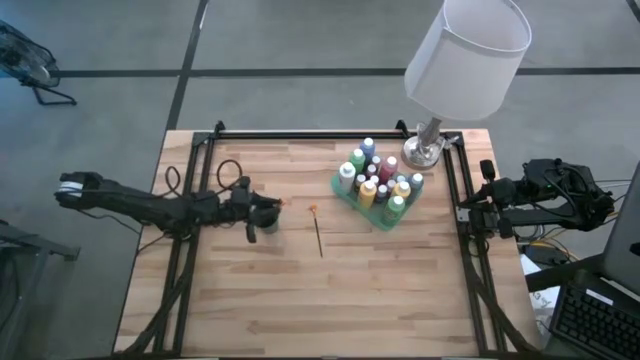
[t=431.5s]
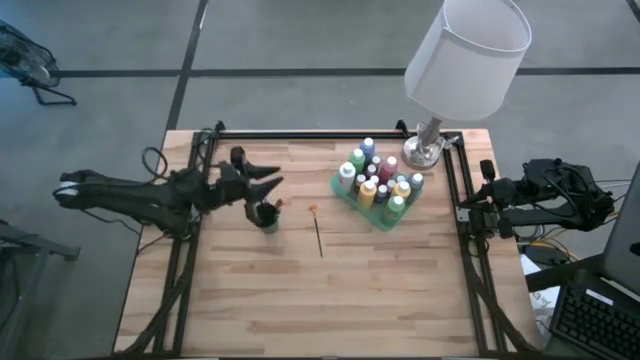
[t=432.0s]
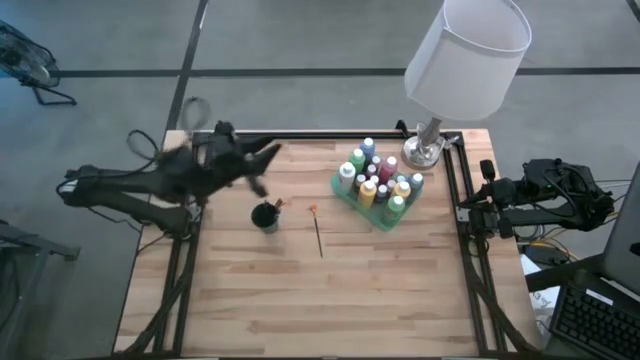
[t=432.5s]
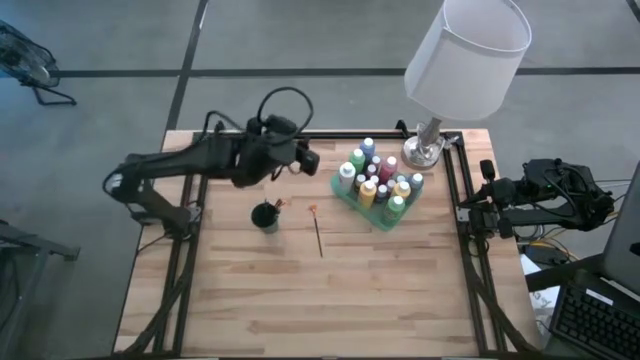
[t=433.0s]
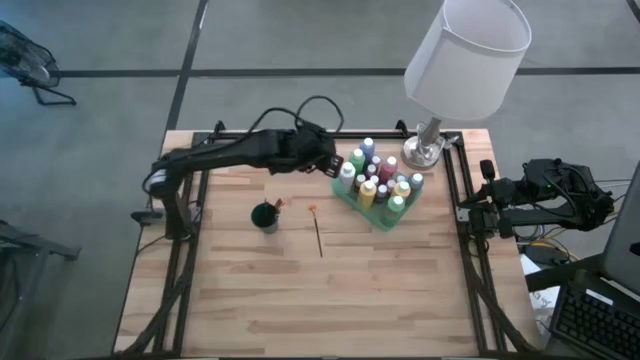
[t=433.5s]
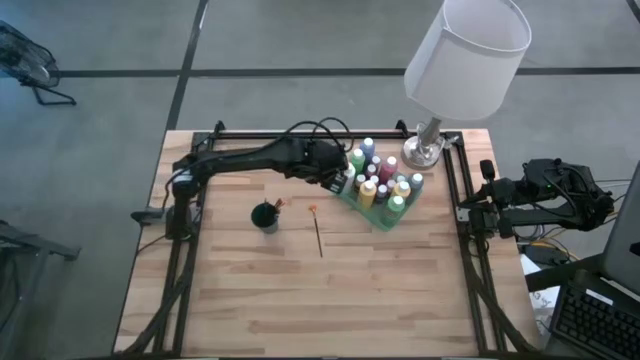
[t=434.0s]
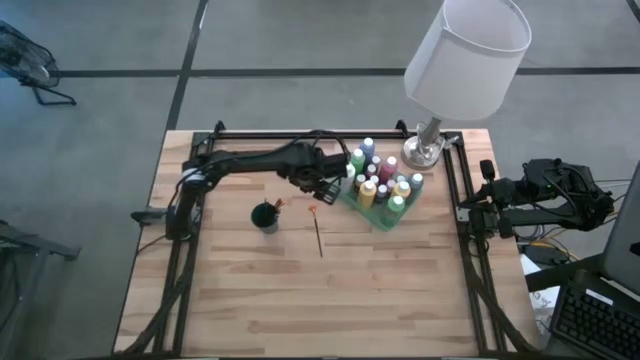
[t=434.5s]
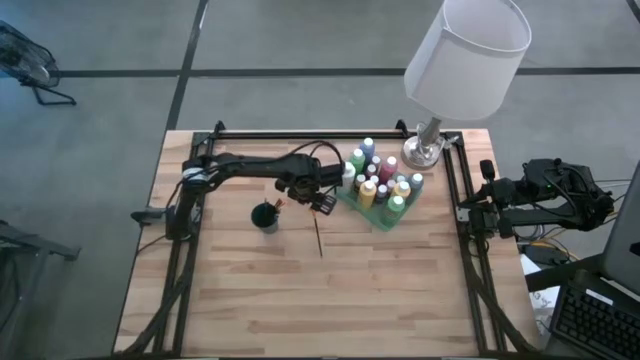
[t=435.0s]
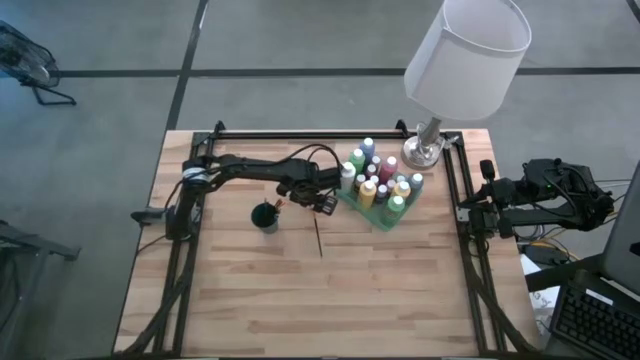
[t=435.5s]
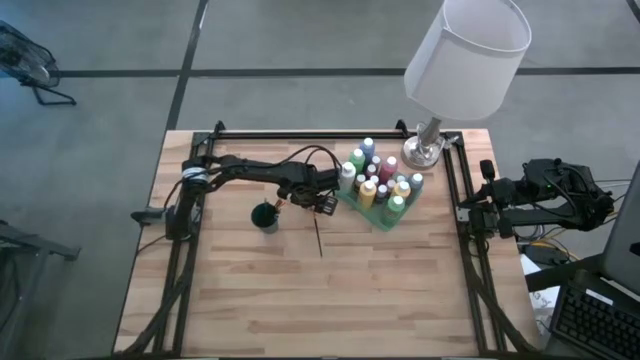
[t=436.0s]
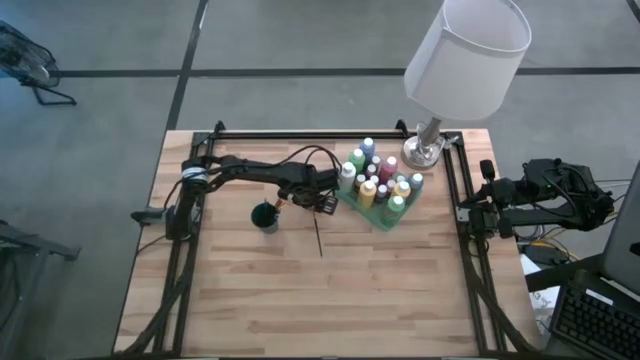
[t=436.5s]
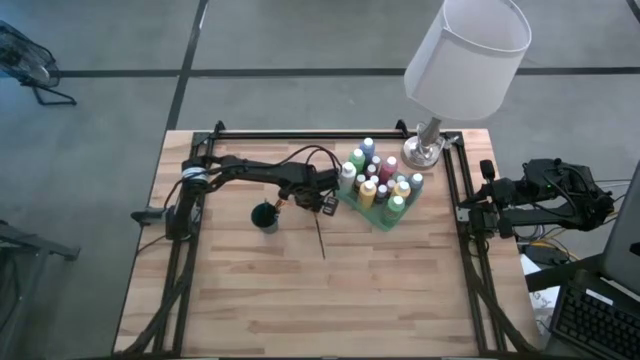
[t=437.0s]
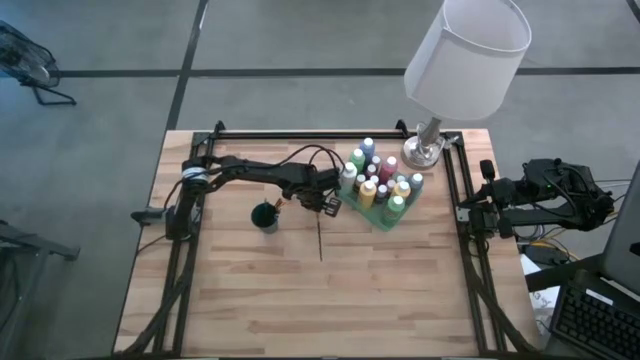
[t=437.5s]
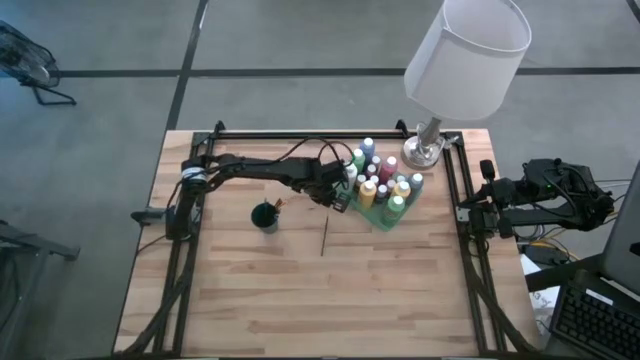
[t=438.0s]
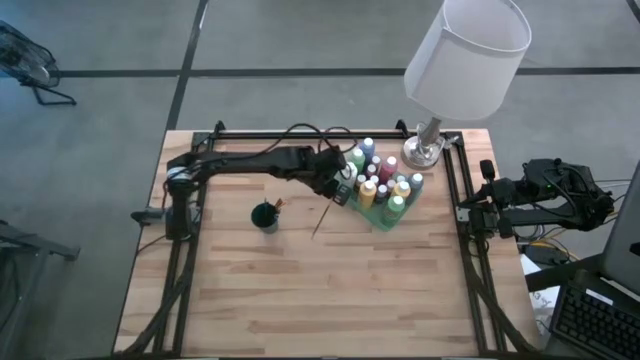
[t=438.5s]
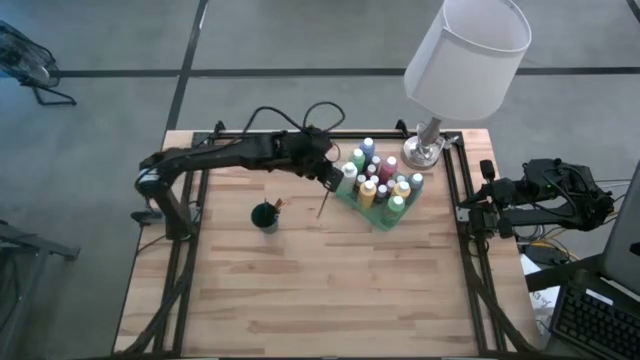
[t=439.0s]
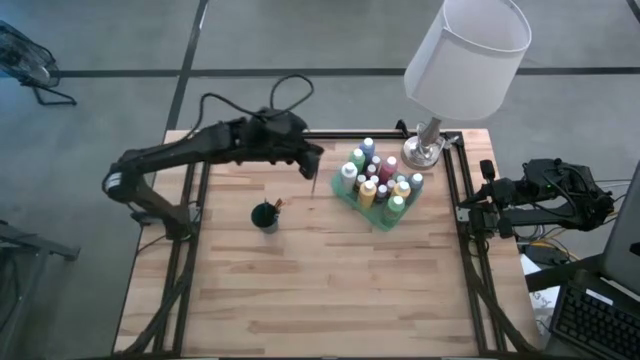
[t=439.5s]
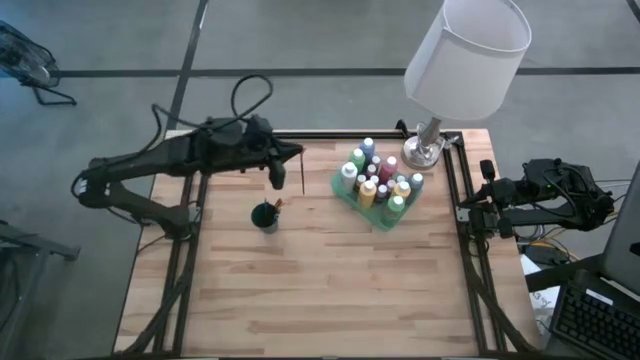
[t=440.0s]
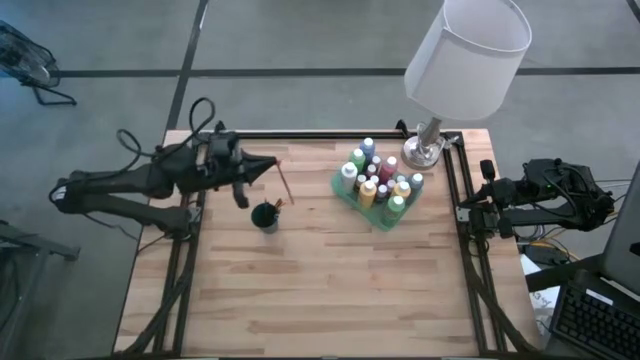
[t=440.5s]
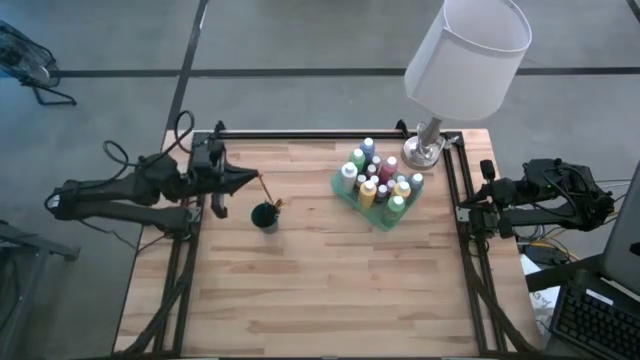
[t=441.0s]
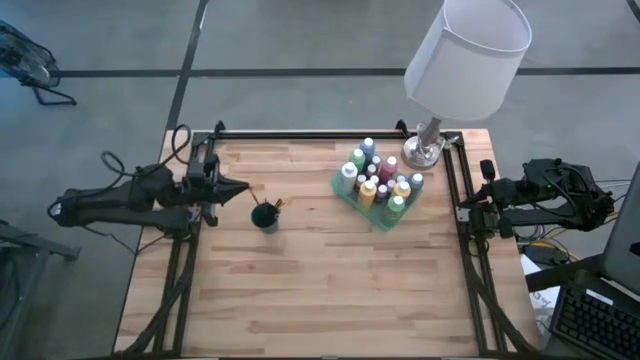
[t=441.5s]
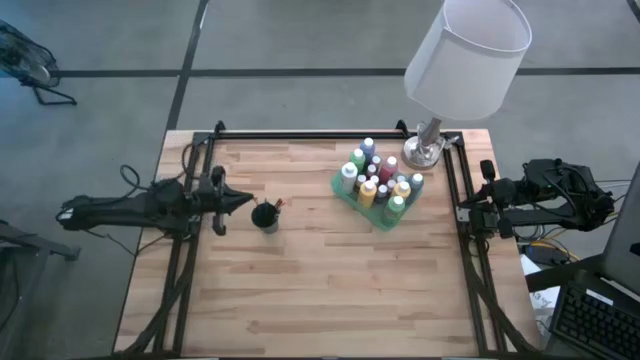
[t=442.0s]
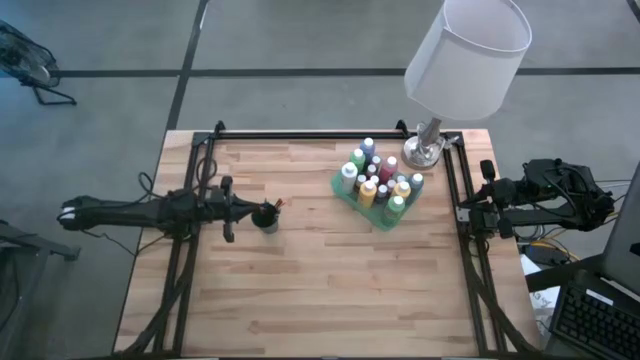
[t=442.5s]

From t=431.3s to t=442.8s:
Task: Pick & Place Paint Supplies
Put the orange paint brush into the green cup

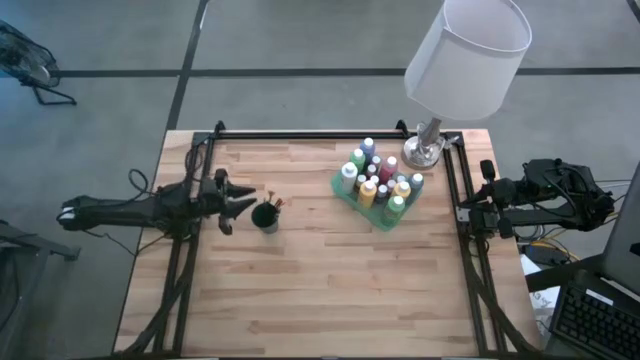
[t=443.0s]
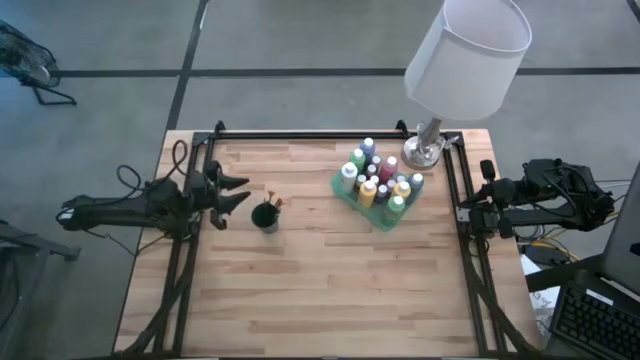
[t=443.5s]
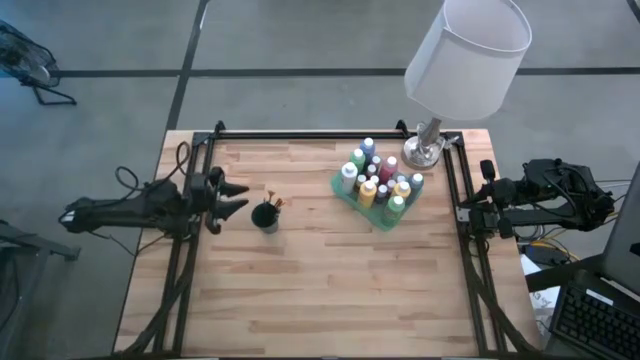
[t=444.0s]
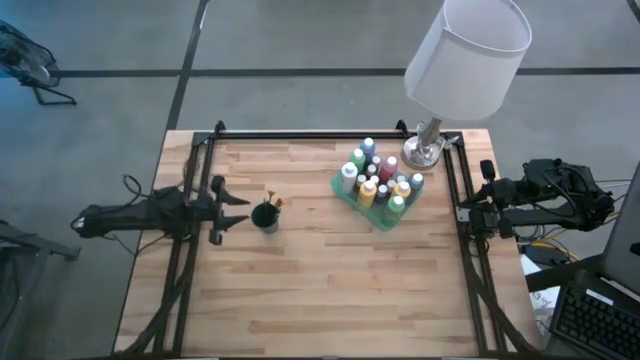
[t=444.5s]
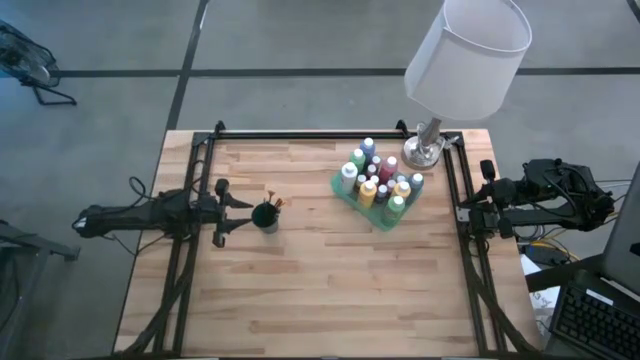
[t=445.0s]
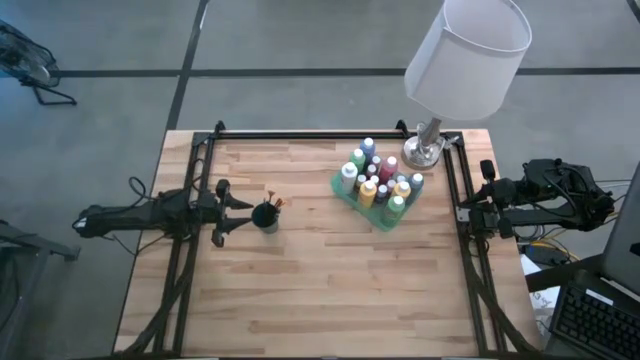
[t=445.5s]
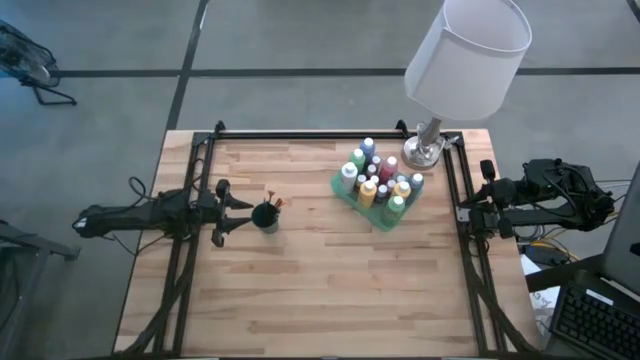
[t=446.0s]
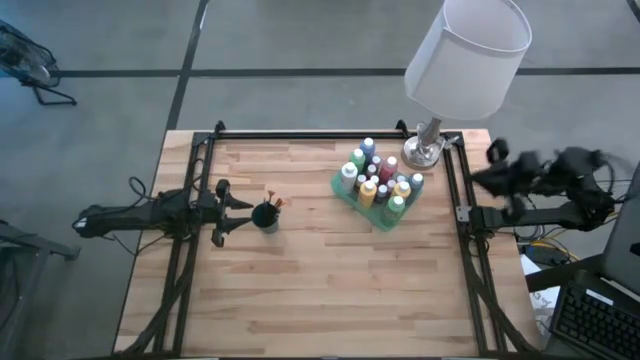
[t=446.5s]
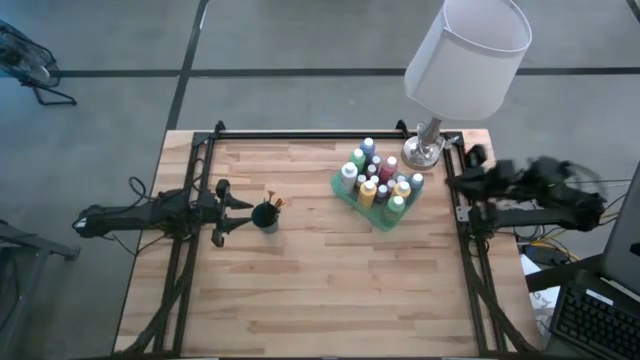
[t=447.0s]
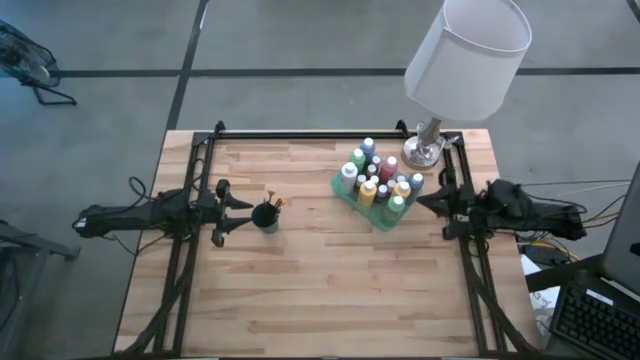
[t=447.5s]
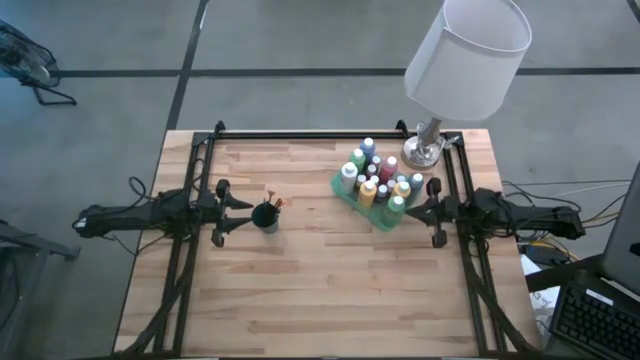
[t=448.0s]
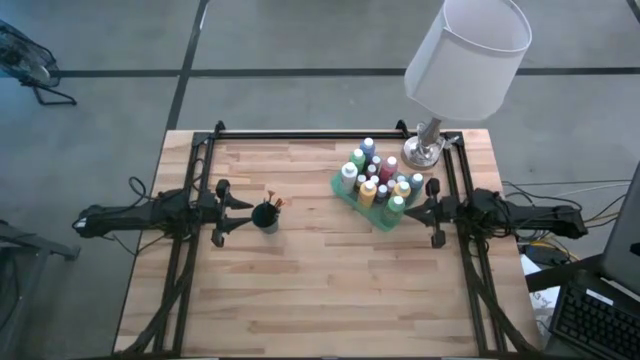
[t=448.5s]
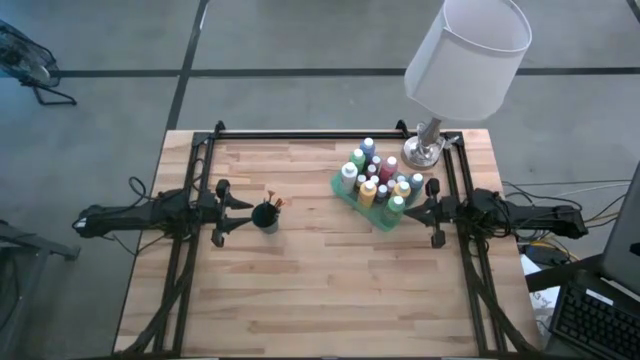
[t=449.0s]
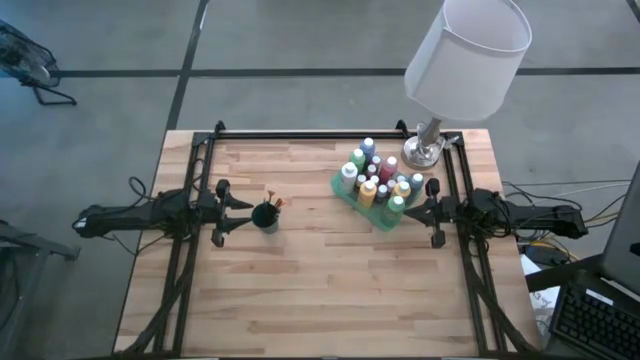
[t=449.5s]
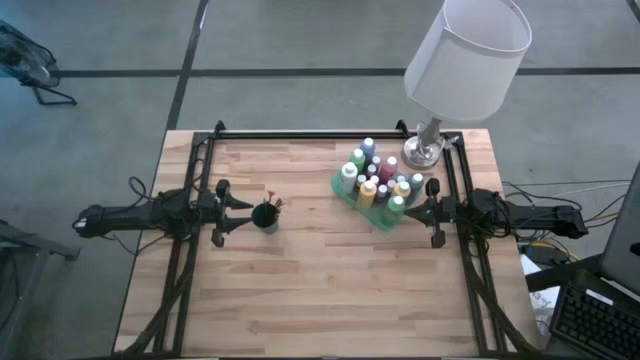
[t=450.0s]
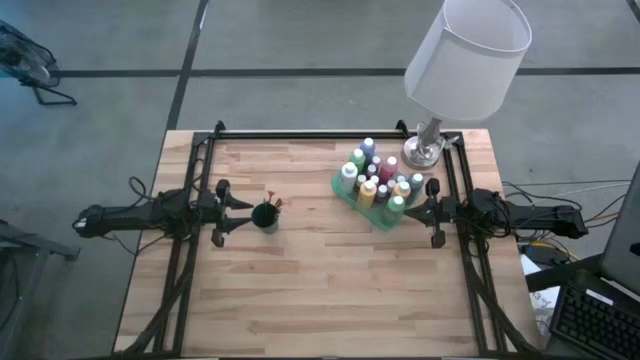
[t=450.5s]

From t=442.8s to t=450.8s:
Return to Home Position

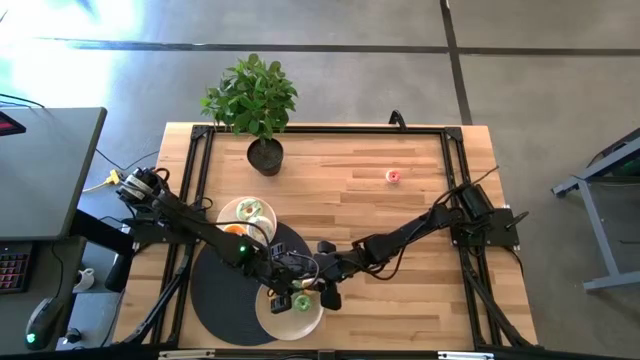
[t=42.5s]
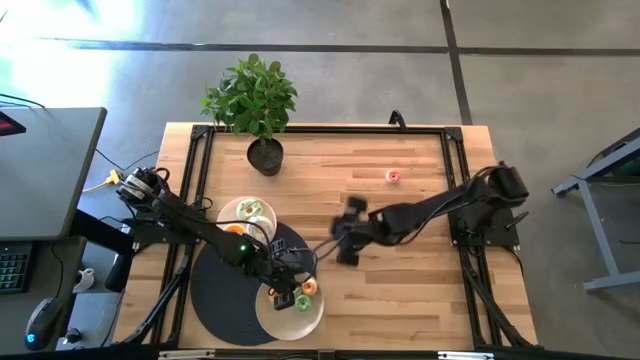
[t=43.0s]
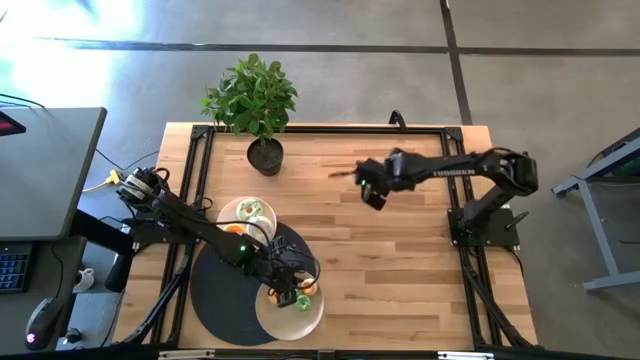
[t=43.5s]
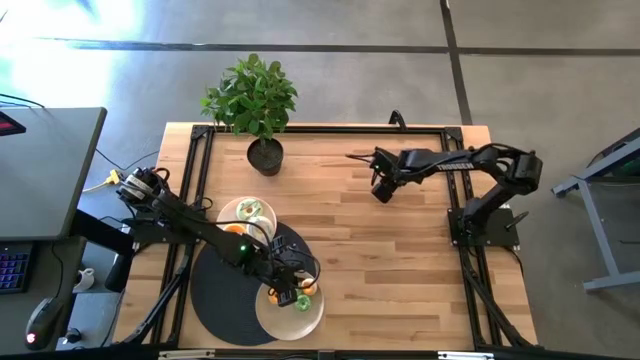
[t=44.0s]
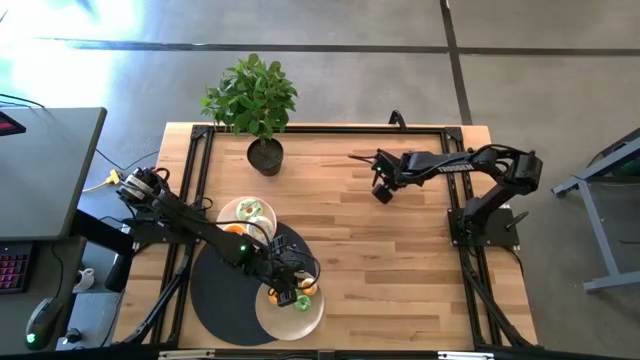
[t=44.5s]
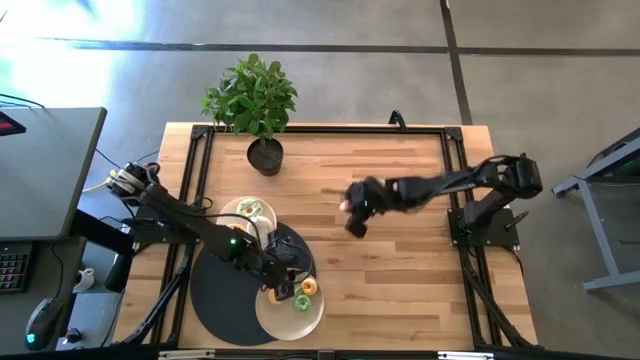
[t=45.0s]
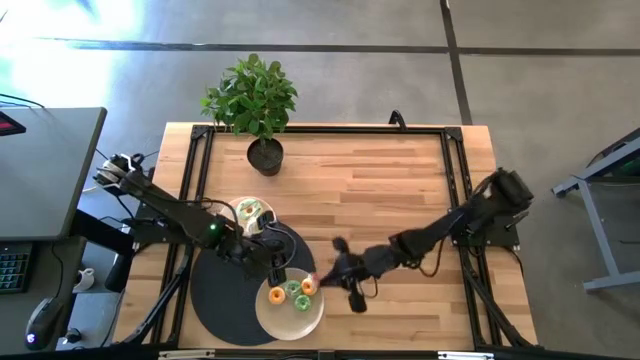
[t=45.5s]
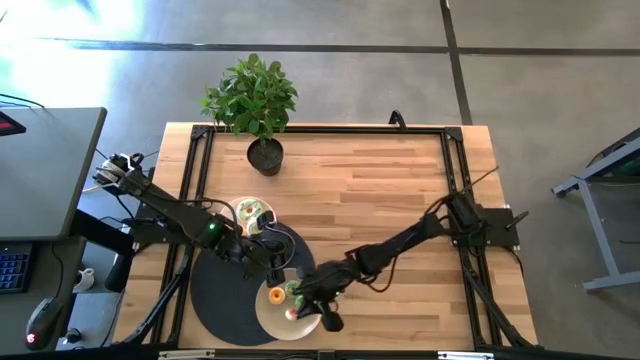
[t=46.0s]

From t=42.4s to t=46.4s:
Task: Pick & Place donuts
Put the small pink donut on the light brown plate
